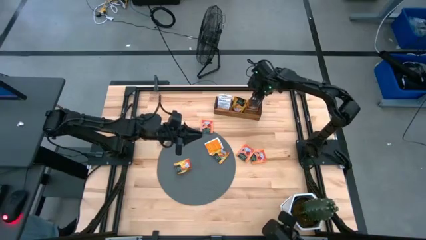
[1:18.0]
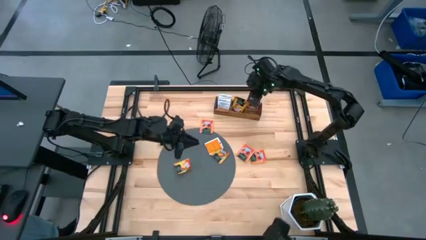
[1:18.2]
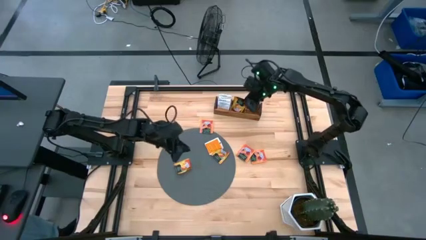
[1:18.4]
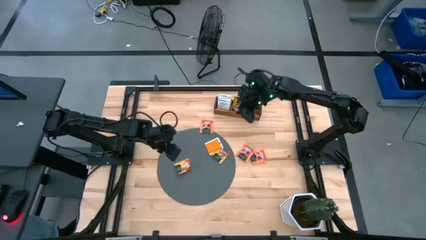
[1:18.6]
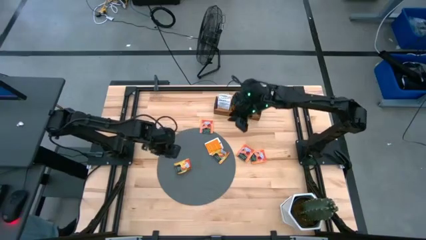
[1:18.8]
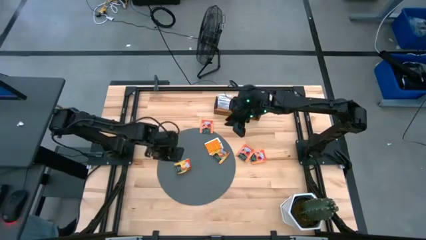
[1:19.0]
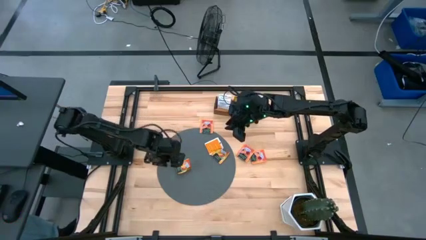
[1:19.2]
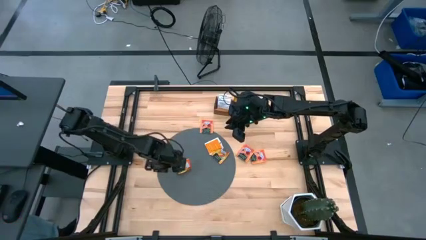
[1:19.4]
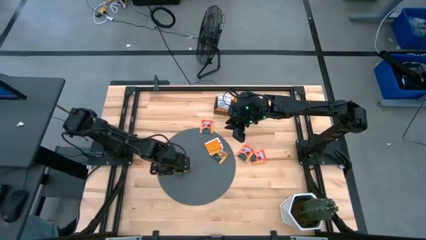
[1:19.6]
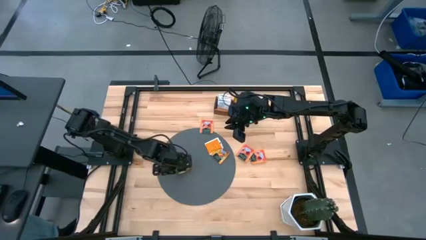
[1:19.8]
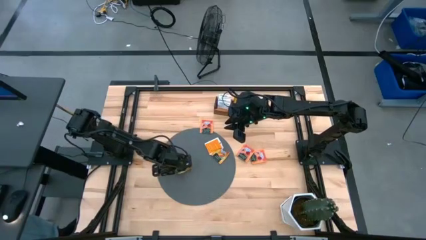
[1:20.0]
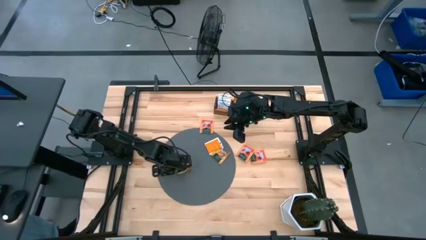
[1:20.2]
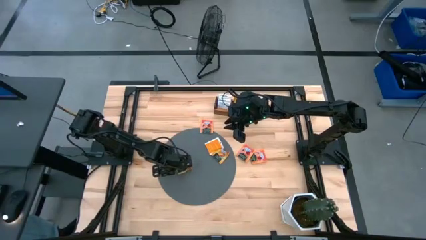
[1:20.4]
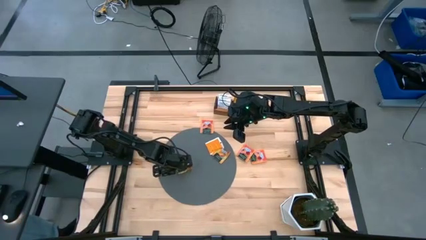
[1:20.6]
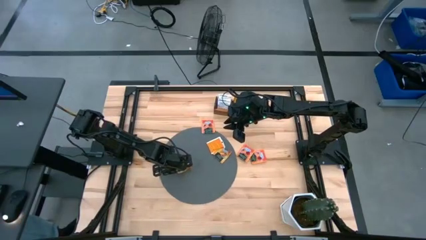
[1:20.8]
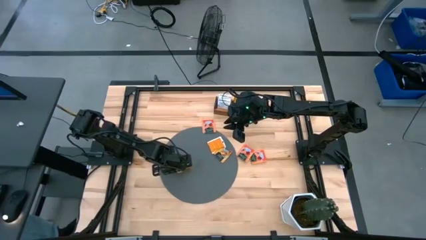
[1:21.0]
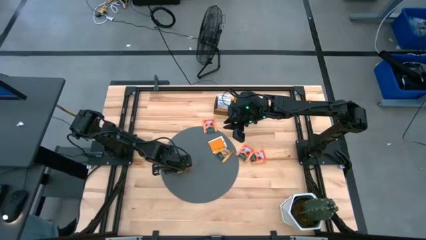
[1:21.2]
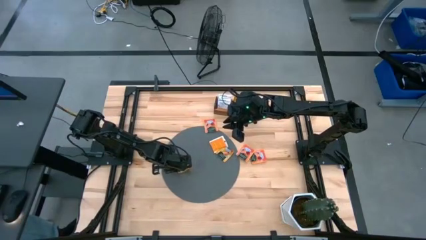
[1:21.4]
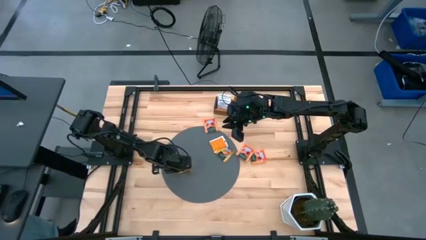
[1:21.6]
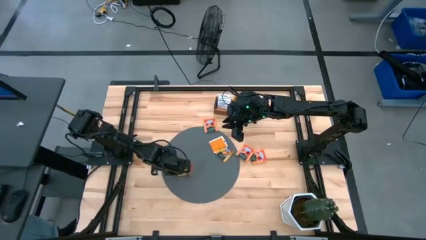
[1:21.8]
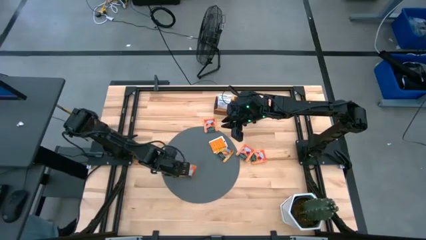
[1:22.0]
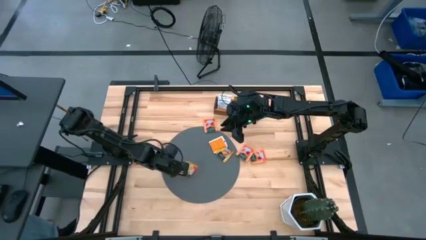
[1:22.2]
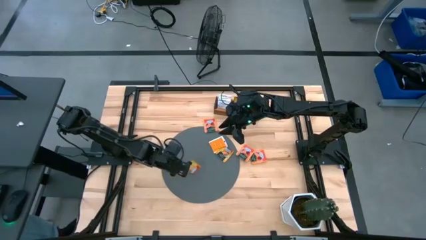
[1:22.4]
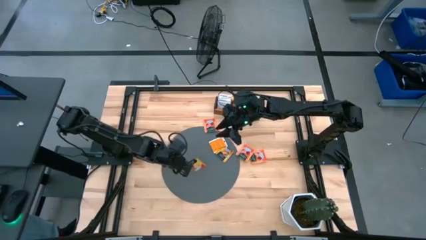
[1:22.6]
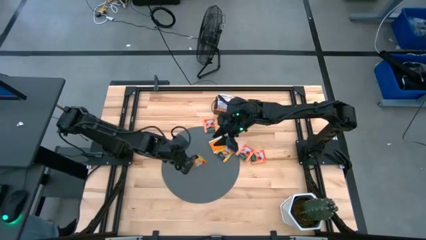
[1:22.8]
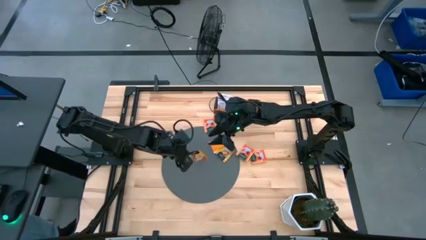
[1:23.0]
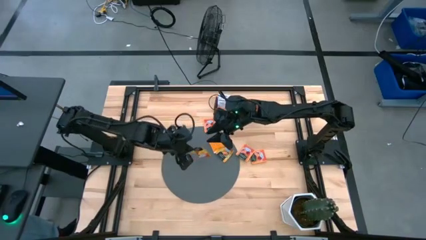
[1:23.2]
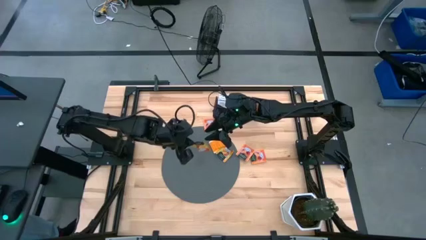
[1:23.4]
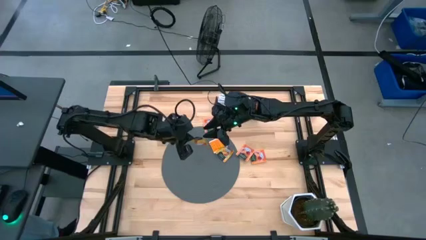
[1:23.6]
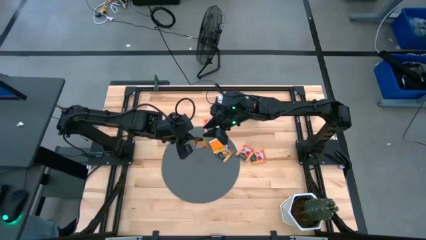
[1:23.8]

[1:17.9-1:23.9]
Task: Pick & Place Tea
Put the yellow tea bag into the middle section of the wooden organizer

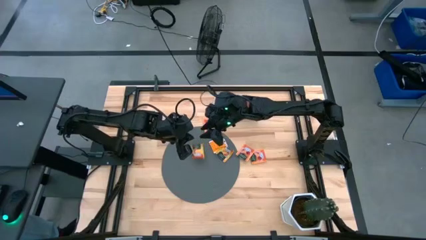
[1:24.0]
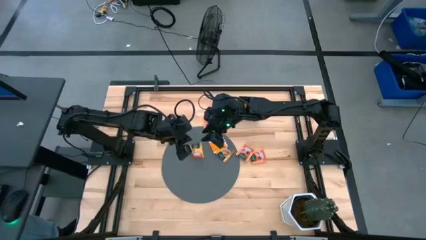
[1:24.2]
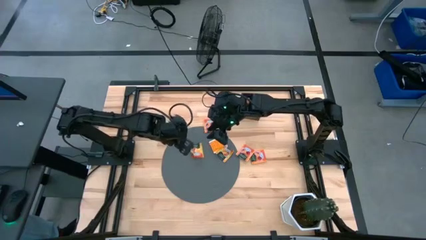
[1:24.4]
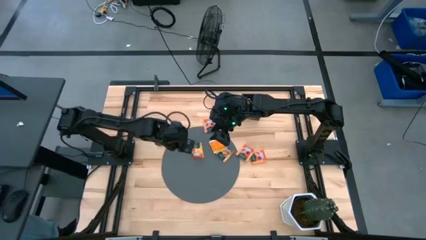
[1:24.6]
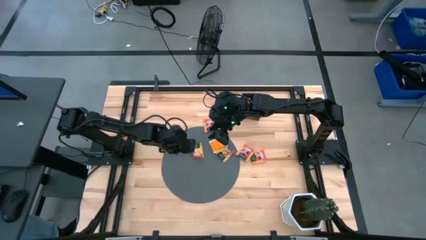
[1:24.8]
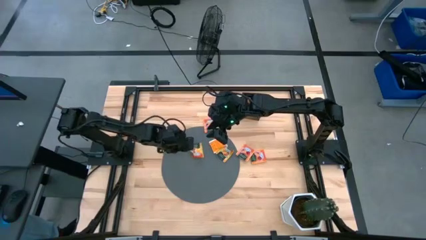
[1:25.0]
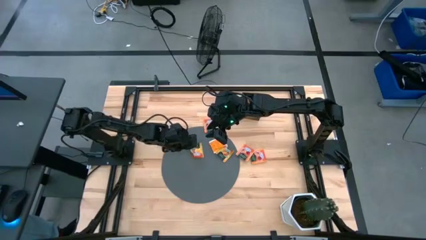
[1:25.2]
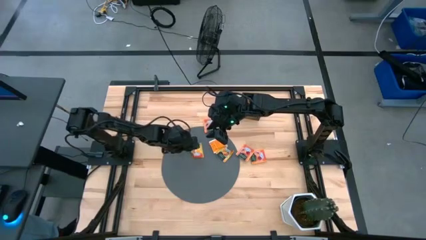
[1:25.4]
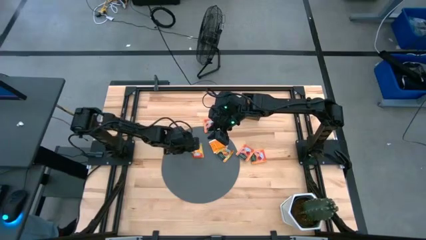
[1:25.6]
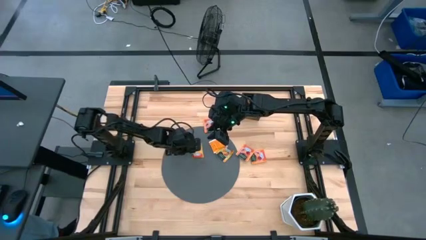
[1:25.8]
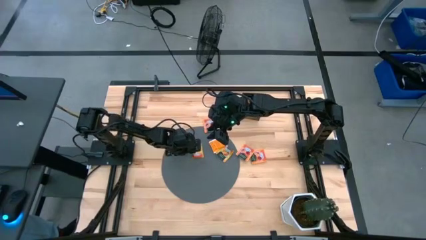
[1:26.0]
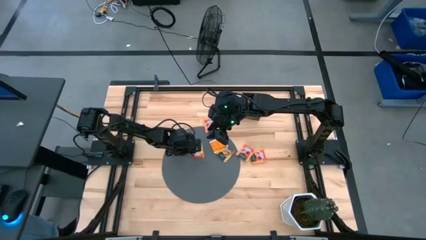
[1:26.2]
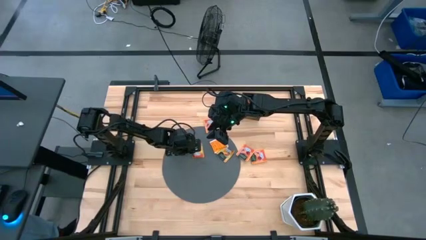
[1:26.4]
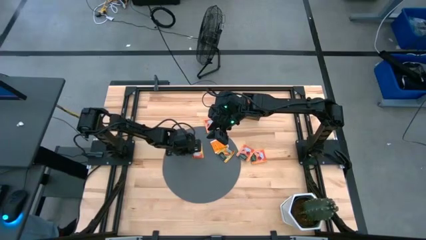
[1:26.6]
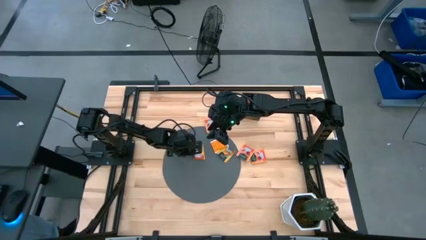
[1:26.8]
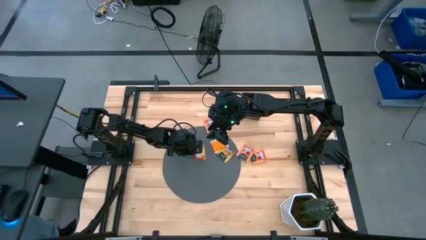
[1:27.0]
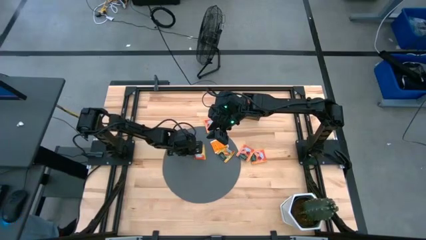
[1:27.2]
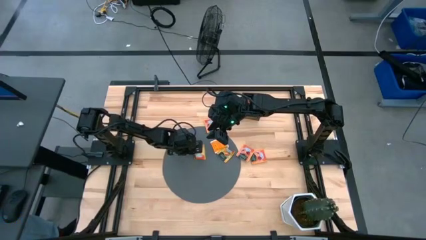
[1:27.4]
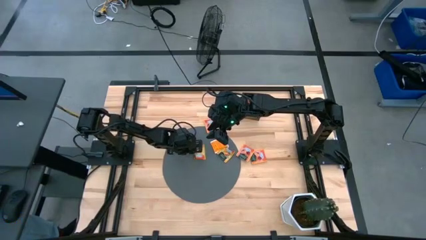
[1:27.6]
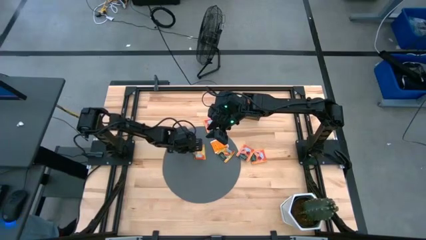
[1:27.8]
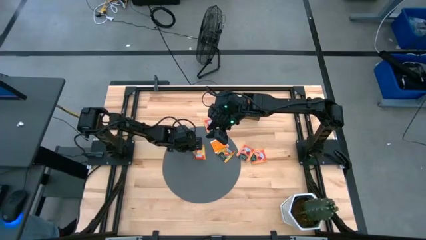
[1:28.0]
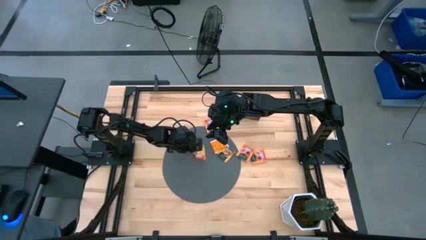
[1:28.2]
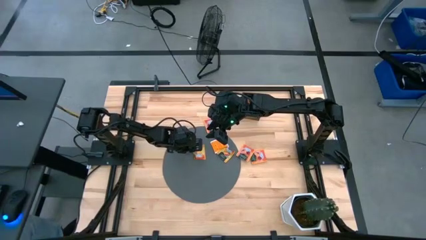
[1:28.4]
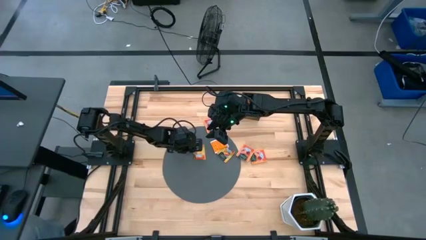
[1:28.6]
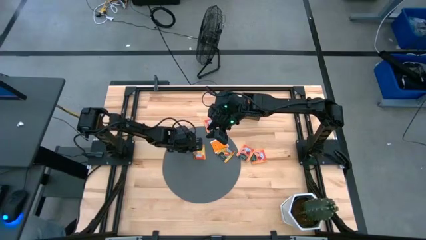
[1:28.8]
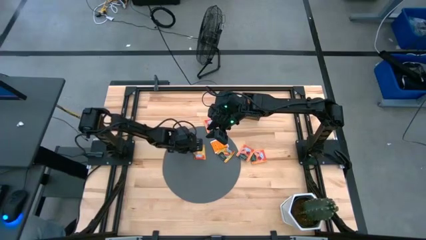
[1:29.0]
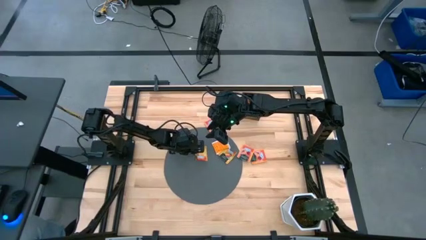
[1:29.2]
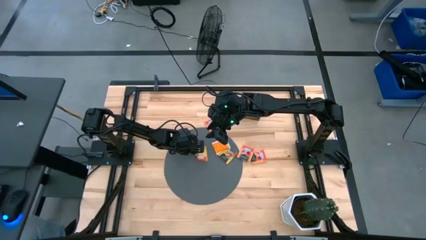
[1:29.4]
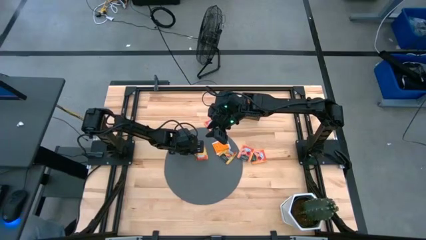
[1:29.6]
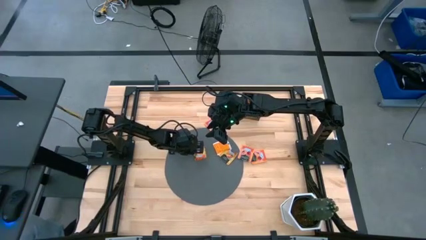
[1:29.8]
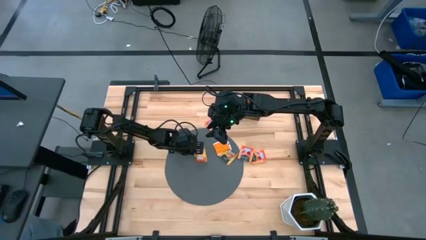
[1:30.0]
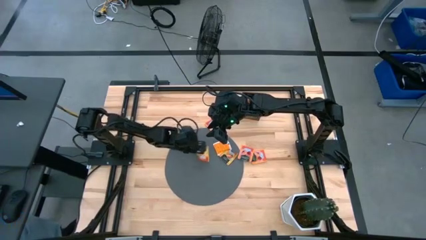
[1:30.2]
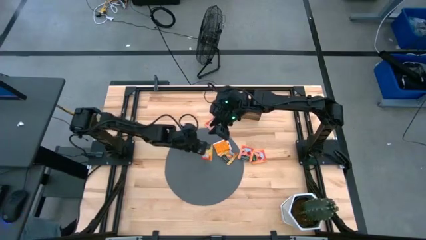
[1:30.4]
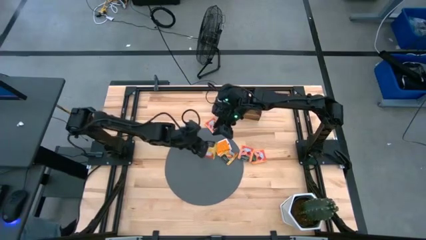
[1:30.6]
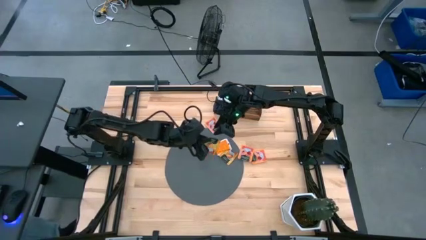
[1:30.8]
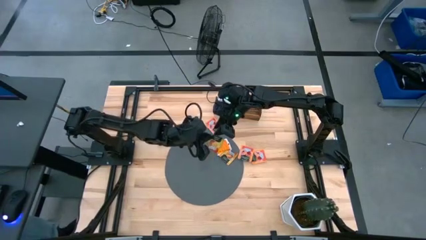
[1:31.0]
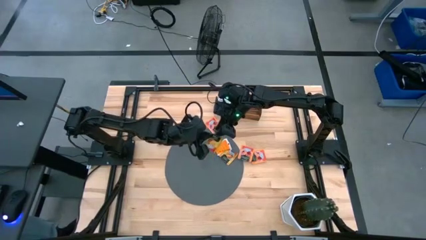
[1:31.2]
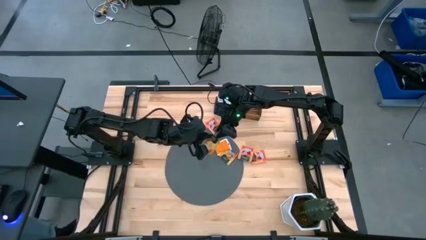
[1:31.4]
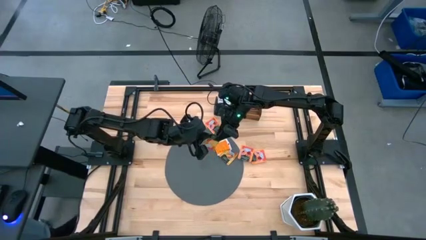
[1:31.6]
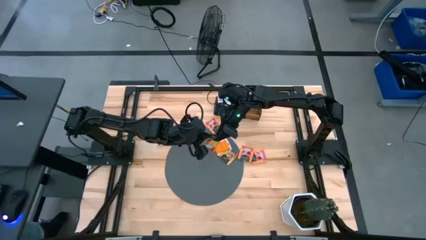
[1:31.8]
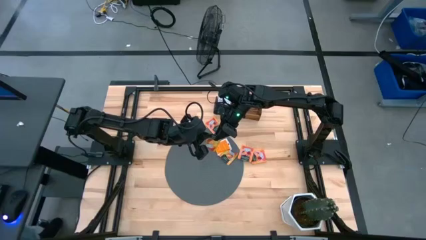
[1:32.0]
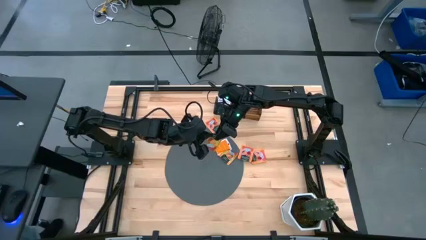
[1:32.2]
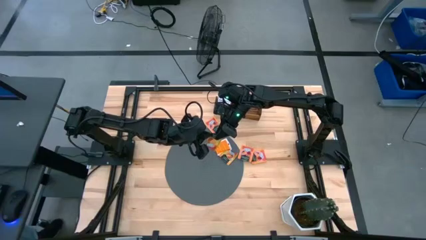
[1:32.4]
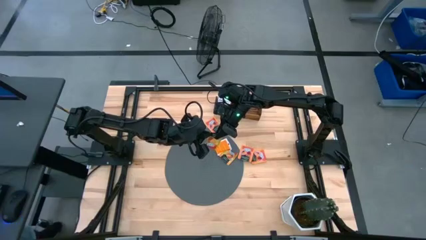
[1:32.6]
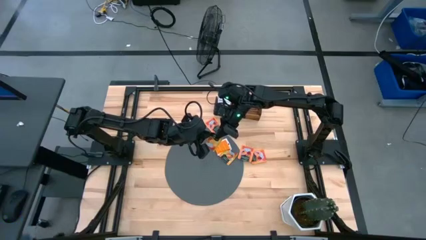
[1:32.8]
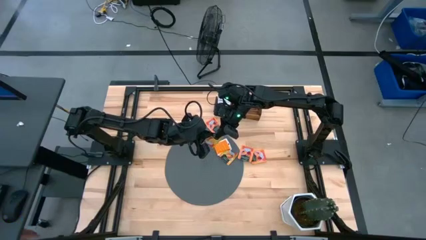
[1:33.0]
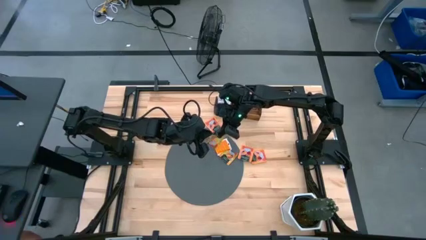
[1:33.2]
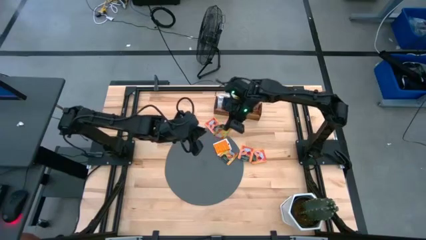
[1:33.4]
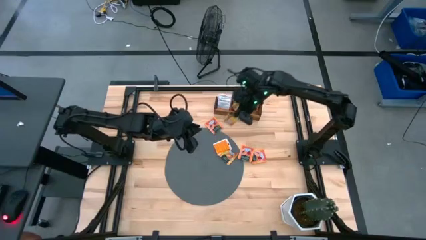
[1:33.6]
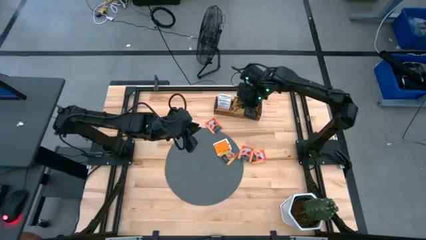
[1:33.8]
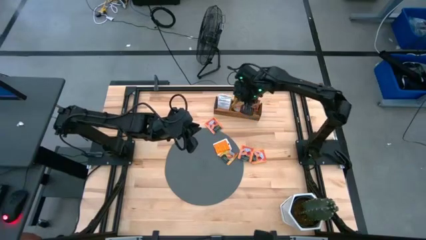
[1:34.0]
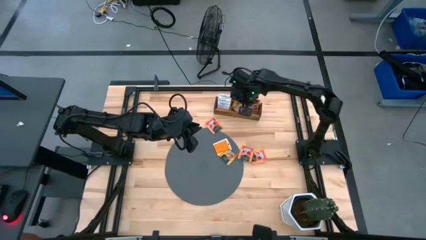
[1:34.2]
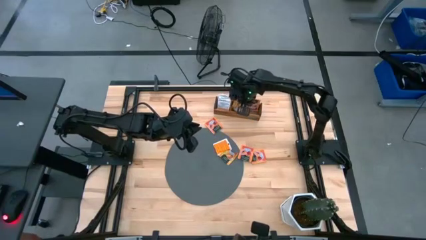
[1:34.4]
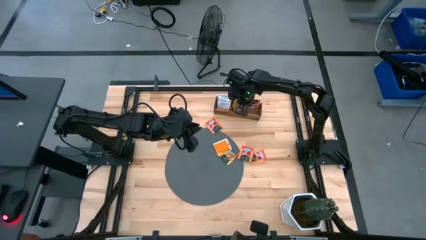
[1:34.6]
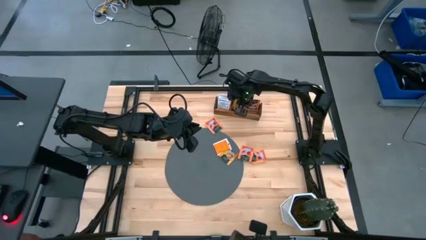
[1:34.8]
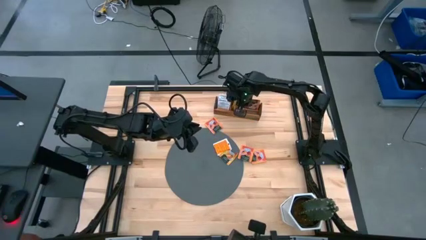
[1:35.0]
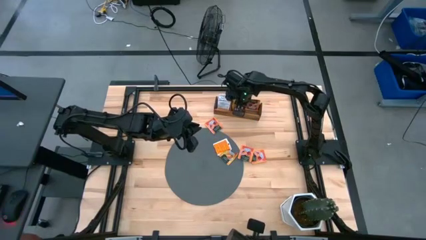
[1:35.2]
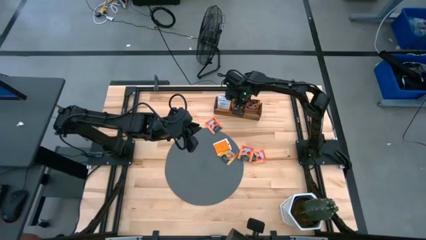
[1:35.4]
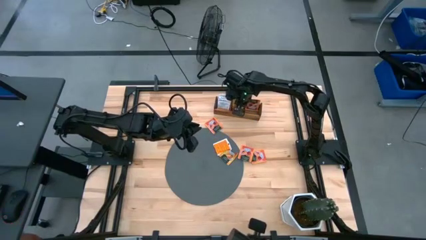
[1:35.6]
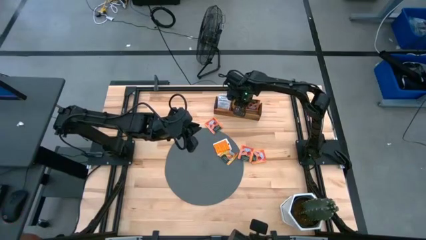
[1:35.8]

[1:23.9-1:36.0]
Put the yellow tea bag into the middle section of the wooden organizer
